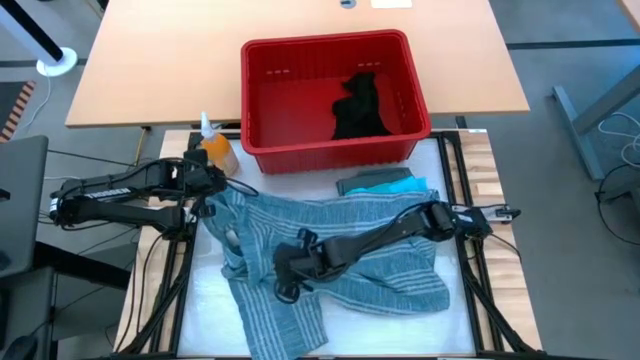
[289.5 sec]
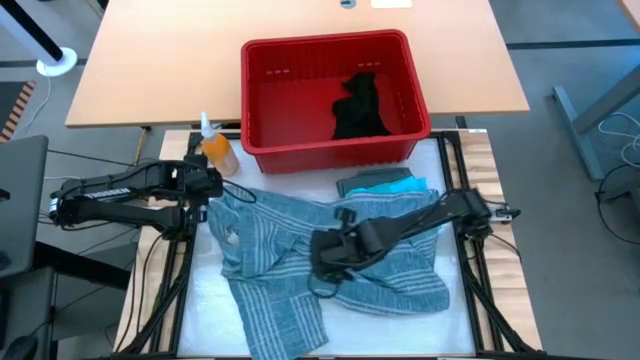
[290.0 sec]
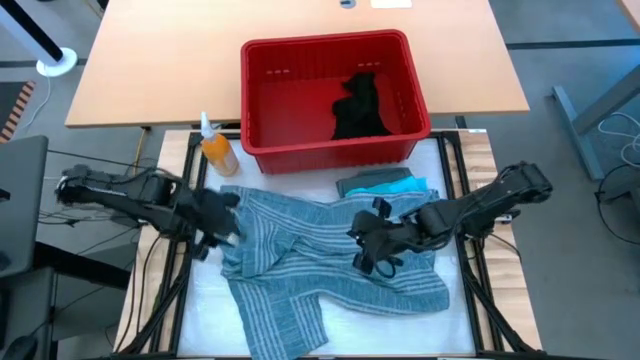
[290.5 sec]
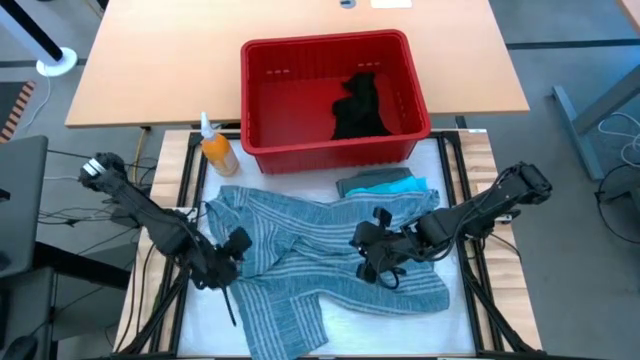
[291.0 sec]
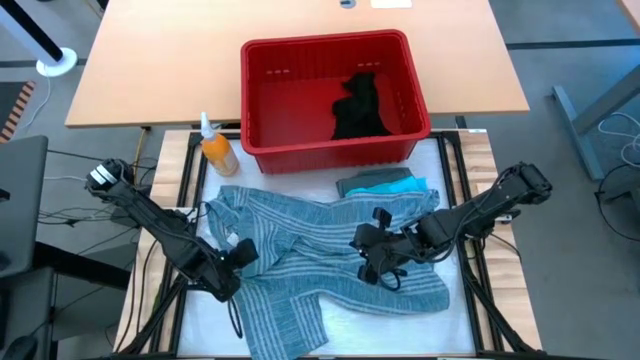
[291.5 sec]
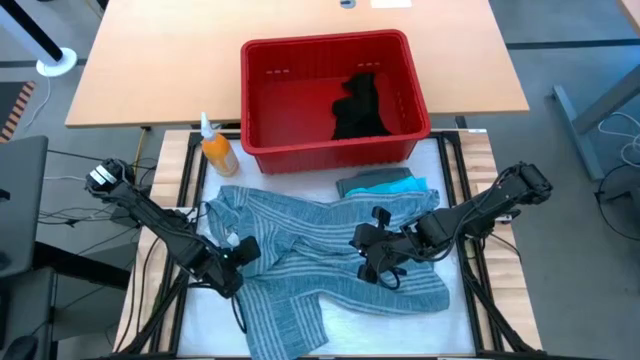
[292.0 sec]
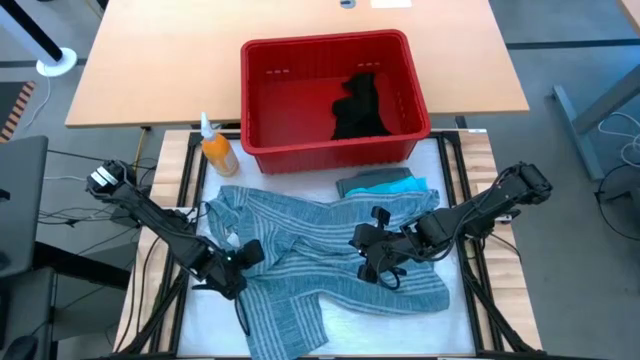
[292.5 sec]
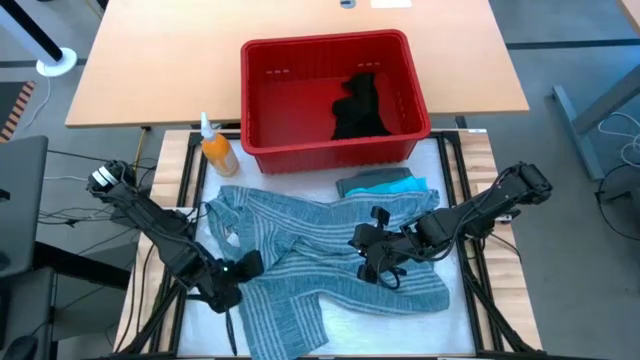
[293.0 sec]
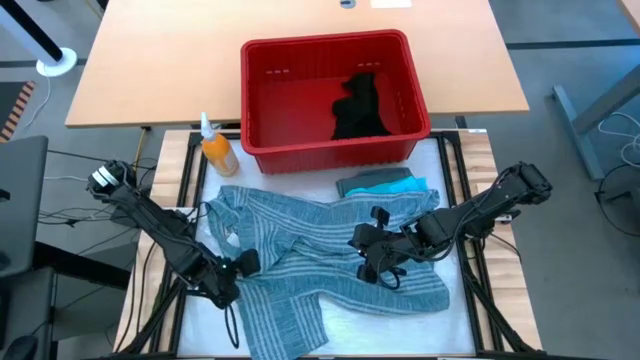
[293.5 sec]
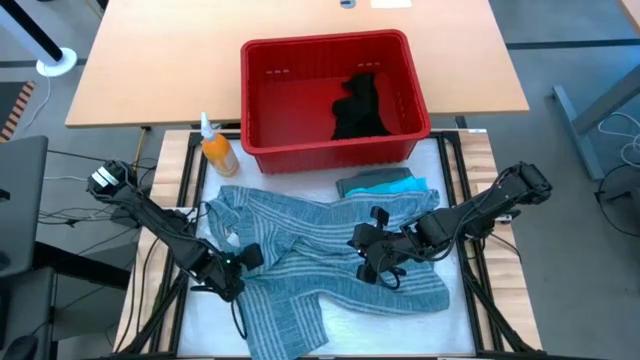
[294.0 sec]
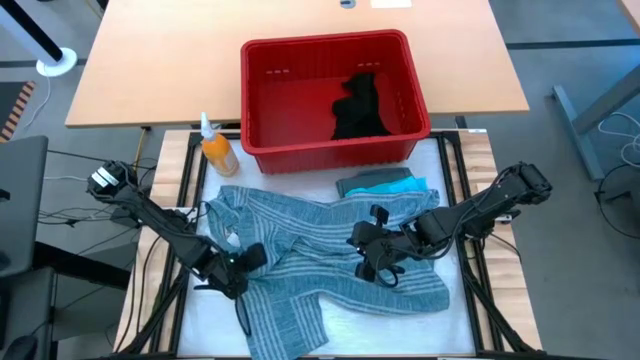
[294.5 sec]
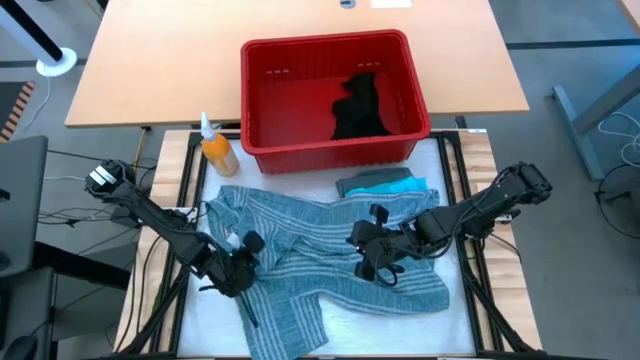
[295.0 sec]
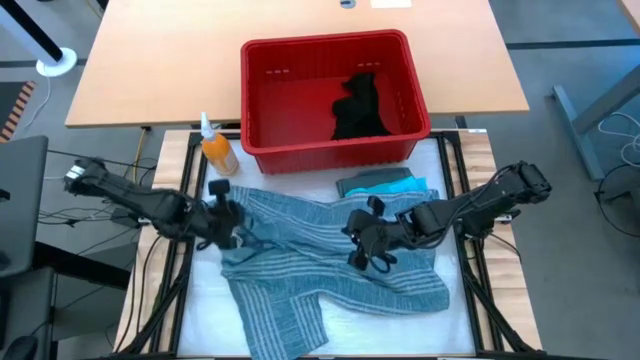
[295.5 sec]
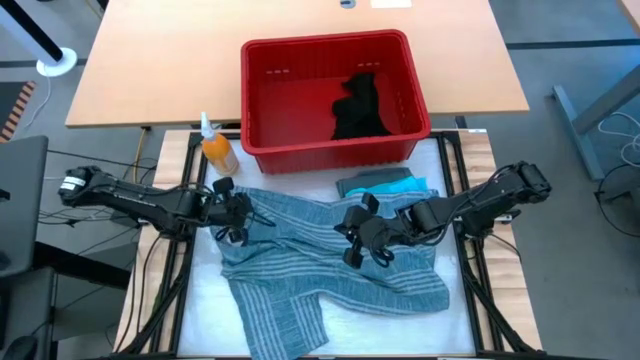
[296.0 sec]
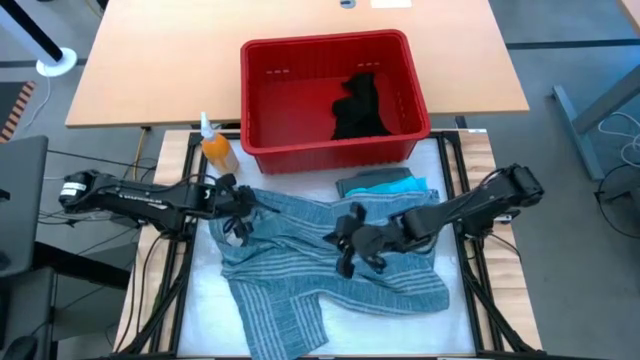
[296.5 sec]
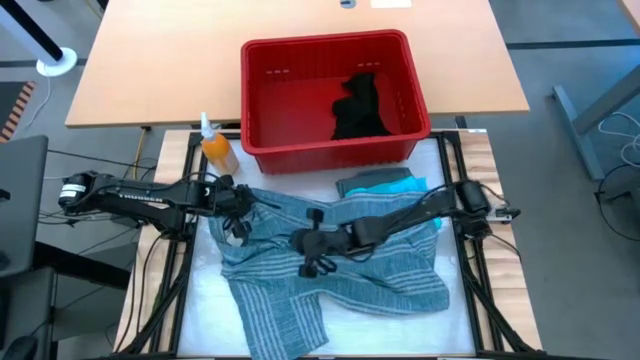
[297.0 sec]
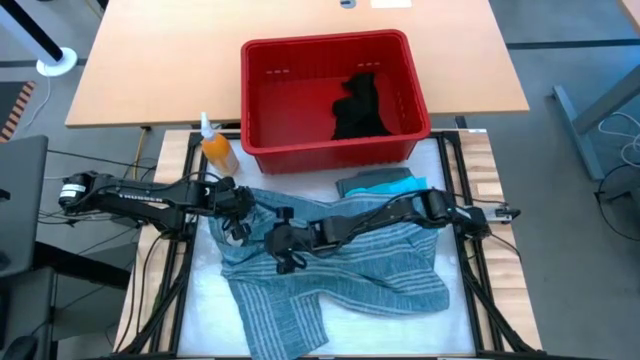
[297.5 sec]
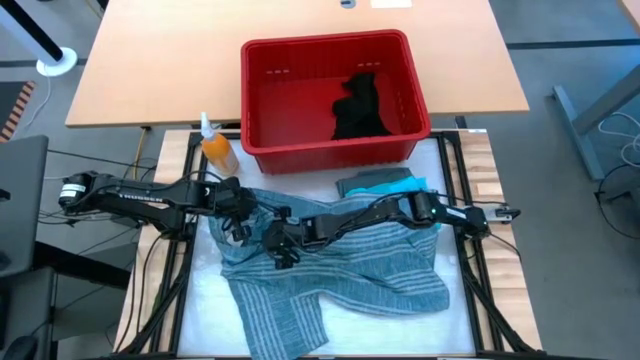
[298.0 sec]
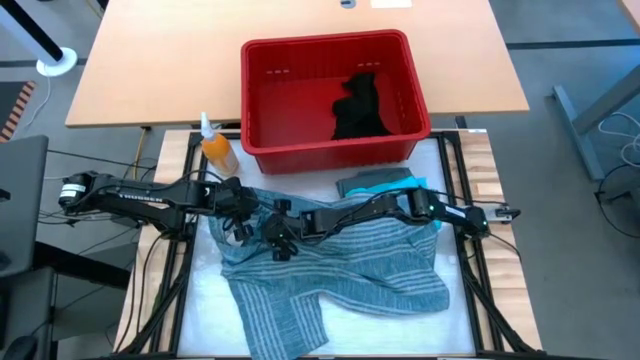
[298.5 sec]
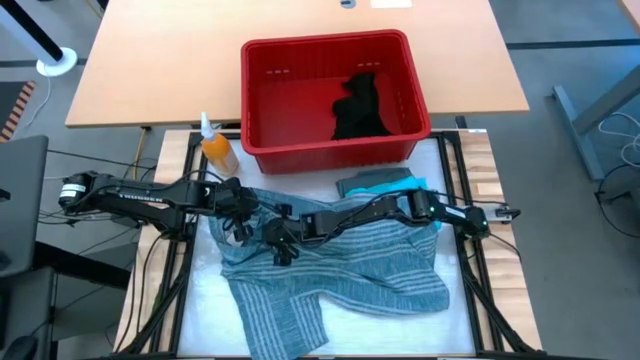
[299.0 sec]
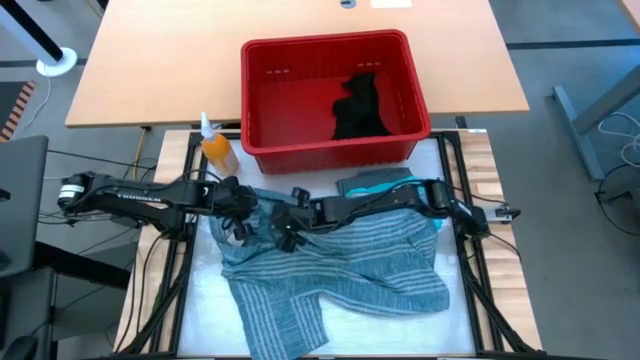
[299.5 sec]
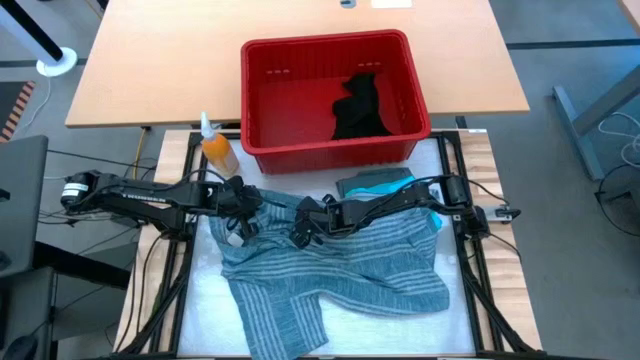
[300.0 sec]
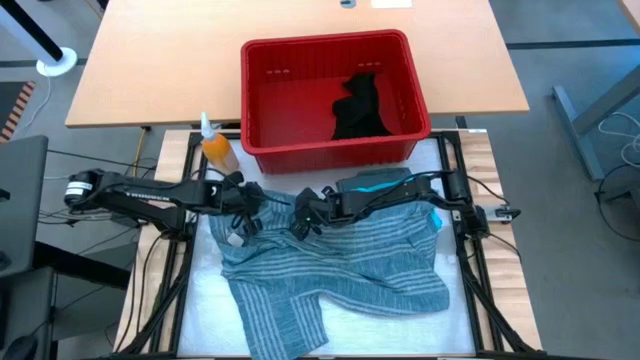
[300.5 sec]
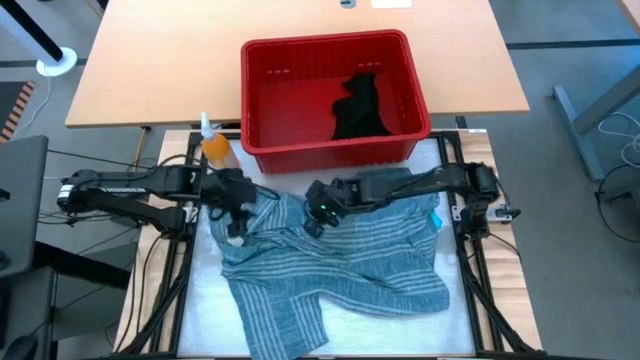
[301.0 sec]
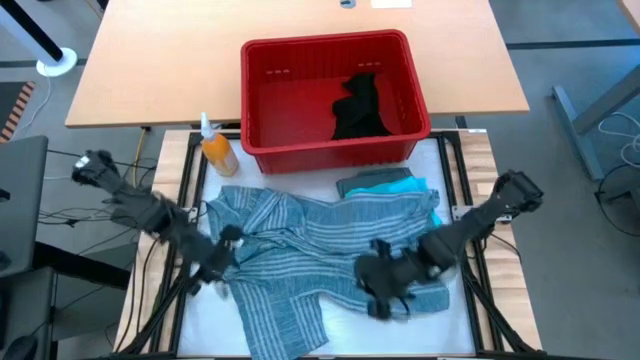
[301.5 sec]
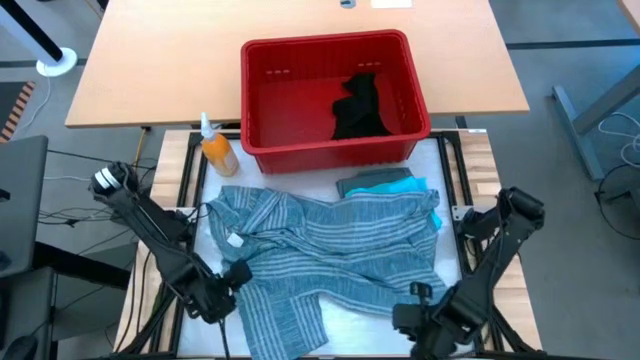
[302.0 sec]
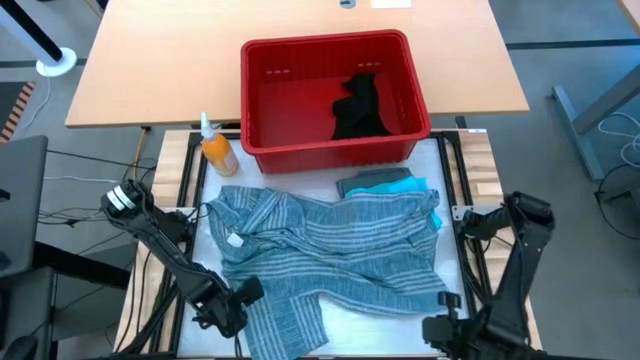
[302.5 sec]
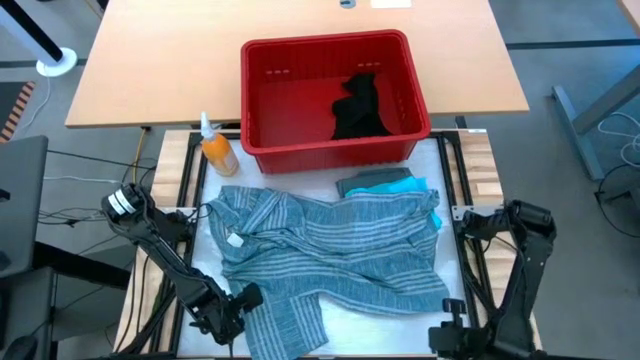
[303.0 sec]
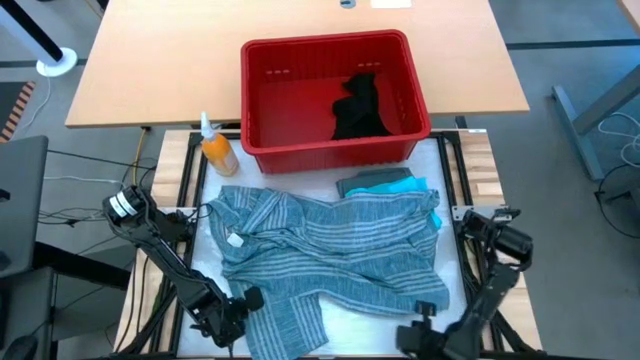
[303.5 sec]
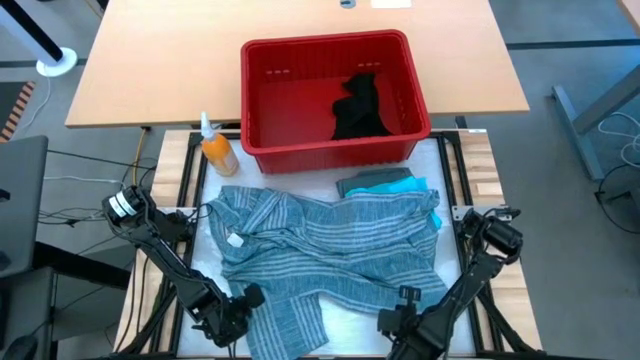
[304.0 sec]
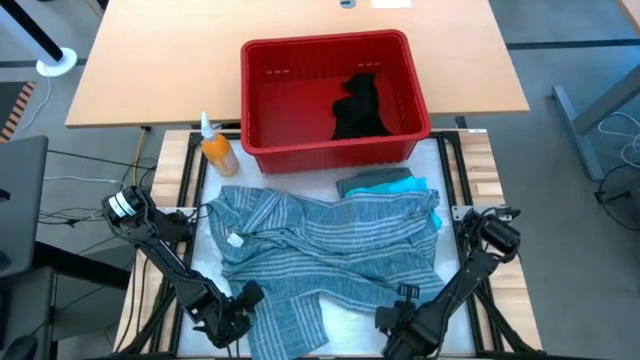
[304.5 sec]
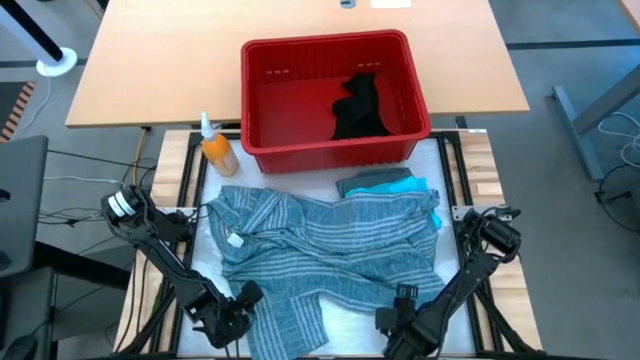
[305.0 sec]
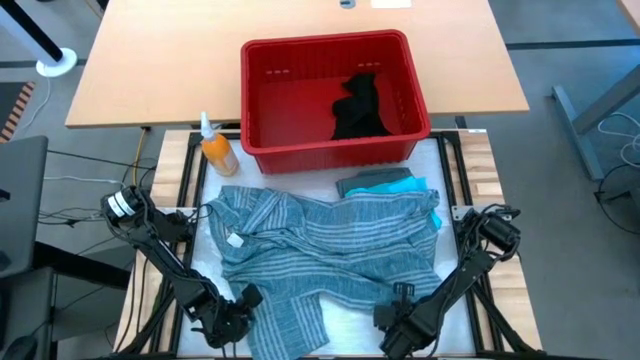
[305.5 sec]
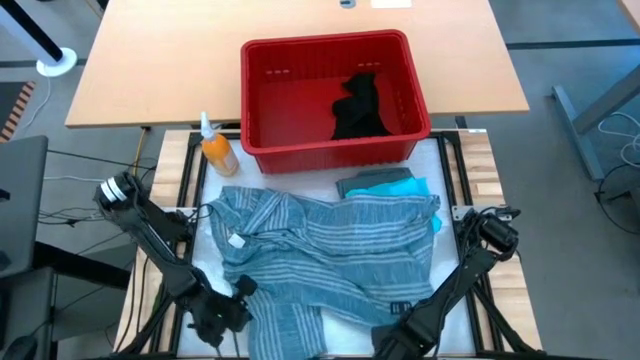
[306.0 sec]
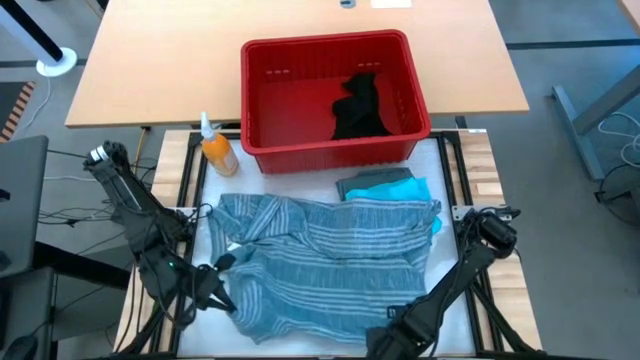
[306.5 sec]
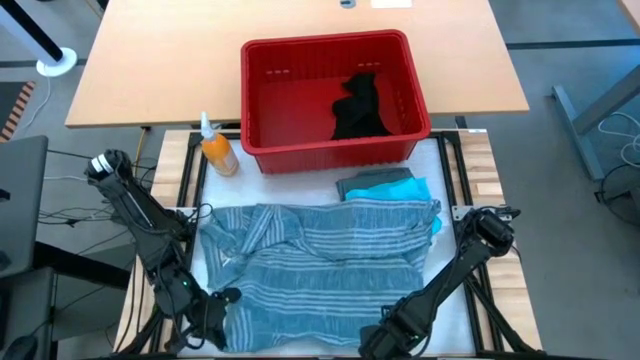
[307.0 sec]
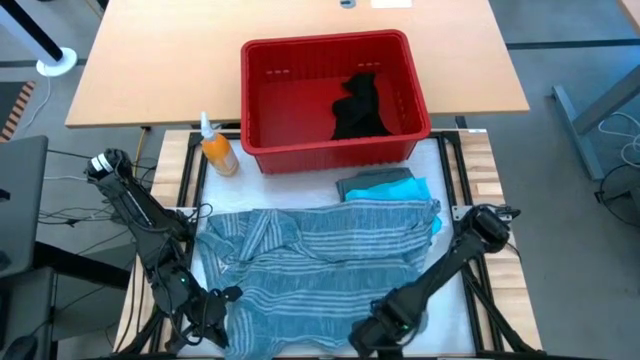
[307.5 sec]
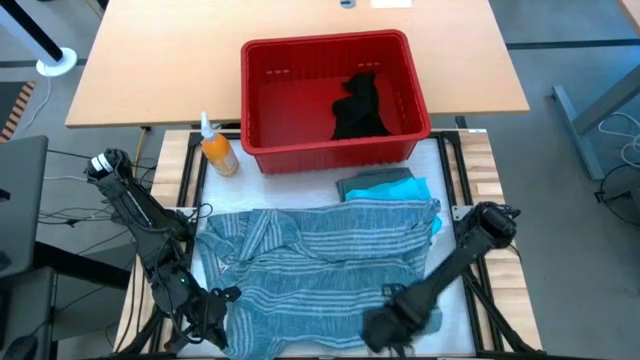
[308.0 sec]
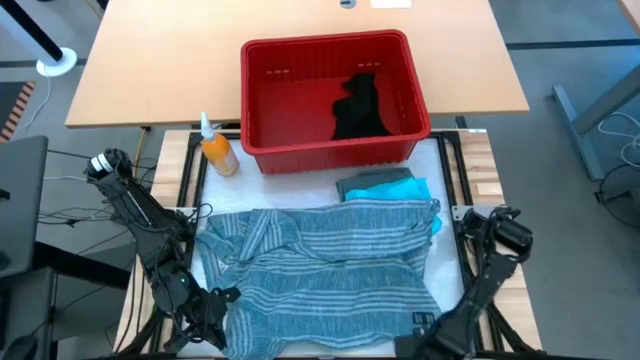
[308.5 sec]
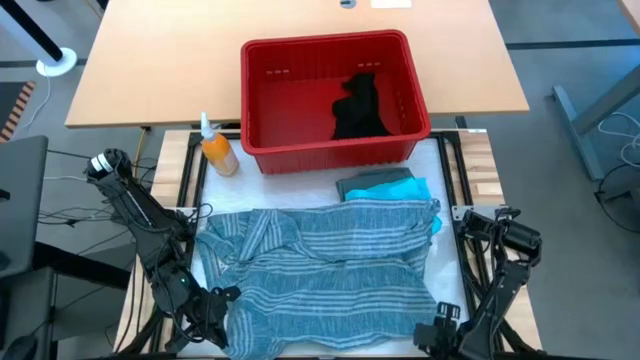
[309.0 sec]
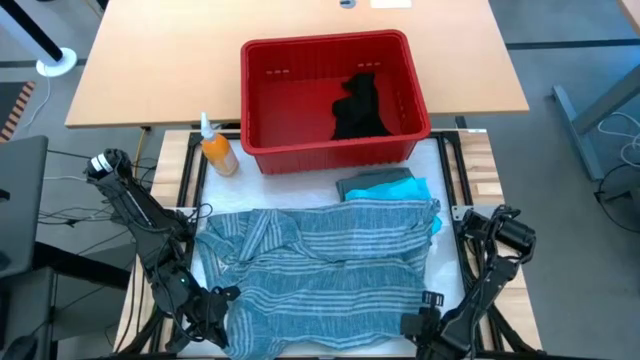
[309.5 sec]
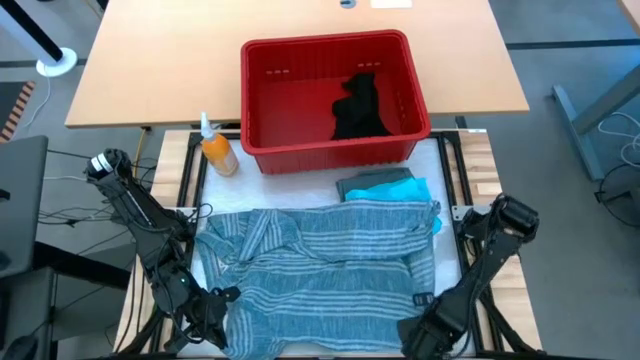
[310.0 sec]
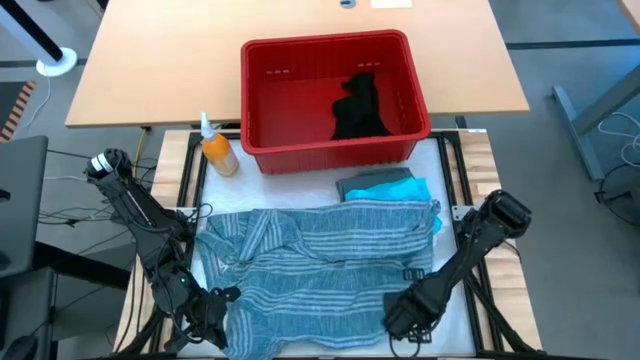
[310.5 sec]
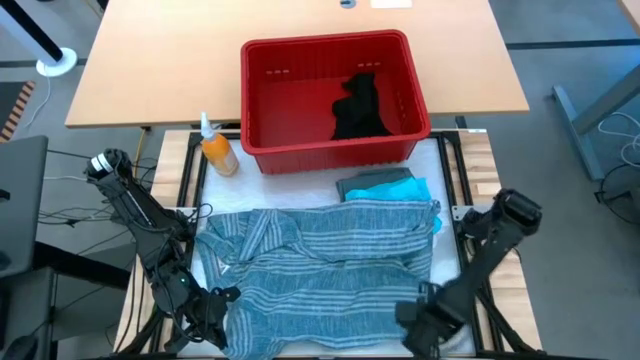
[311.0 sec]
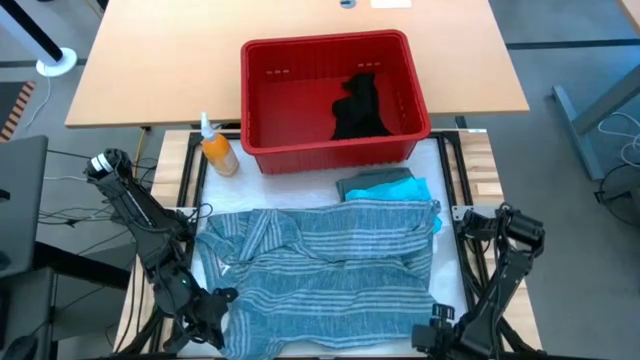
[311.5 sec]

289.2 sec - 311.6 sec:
Task: Fold Laundry from Bin
Fold the blue patterned polo shirt
